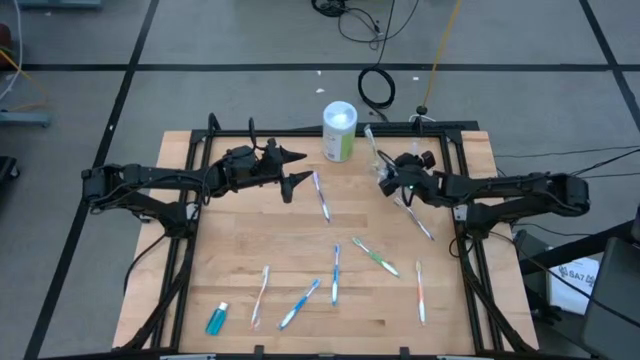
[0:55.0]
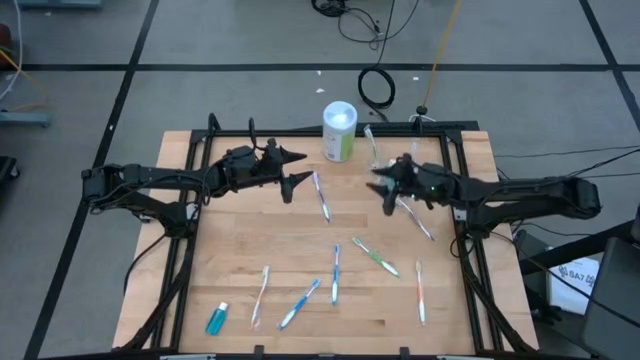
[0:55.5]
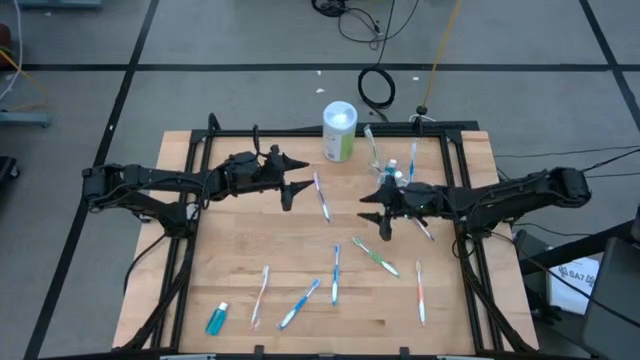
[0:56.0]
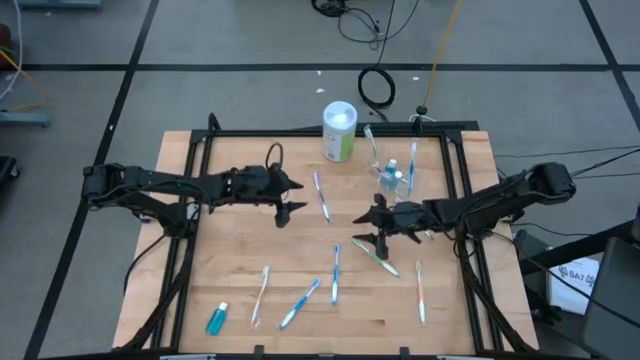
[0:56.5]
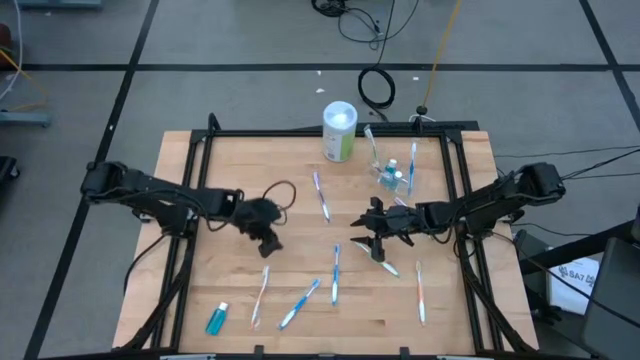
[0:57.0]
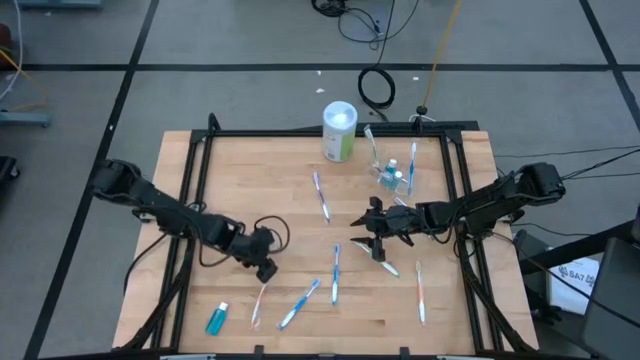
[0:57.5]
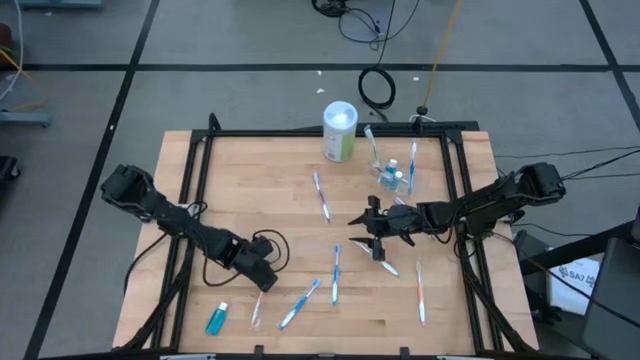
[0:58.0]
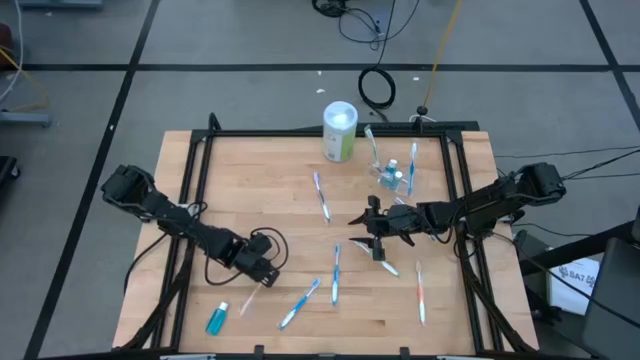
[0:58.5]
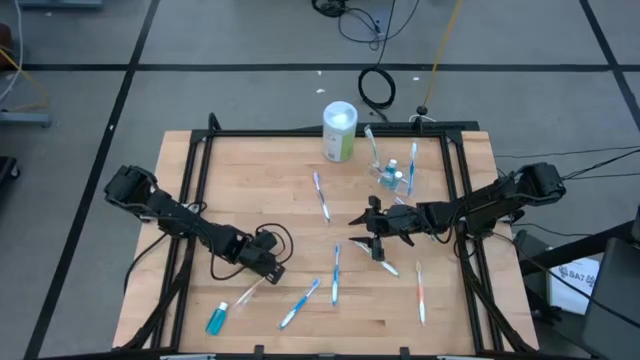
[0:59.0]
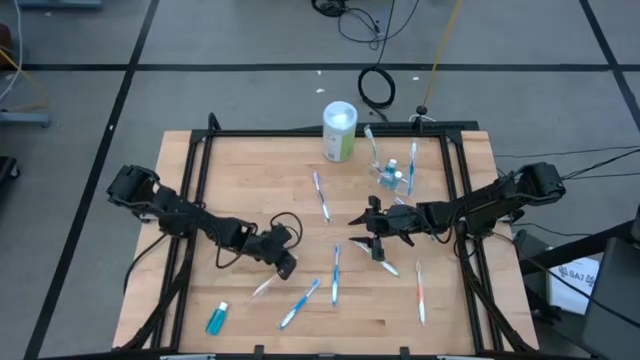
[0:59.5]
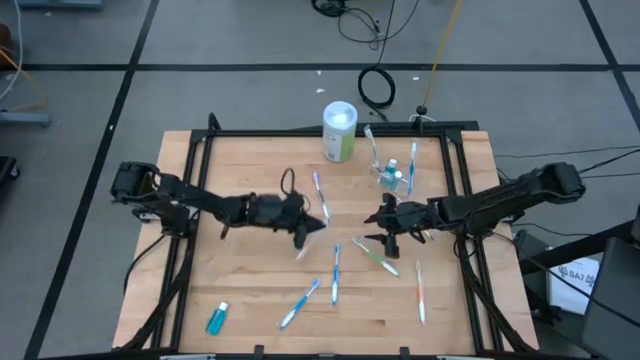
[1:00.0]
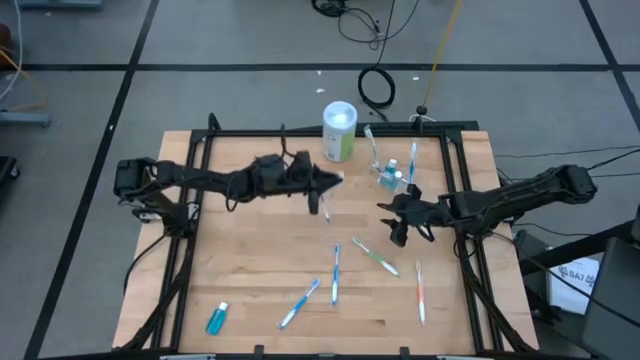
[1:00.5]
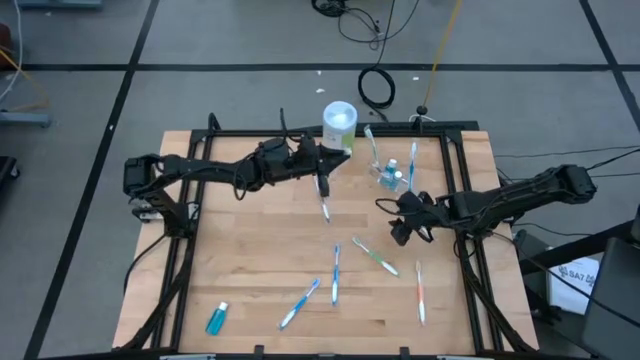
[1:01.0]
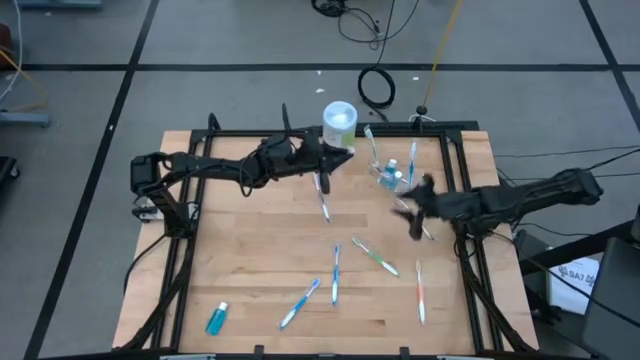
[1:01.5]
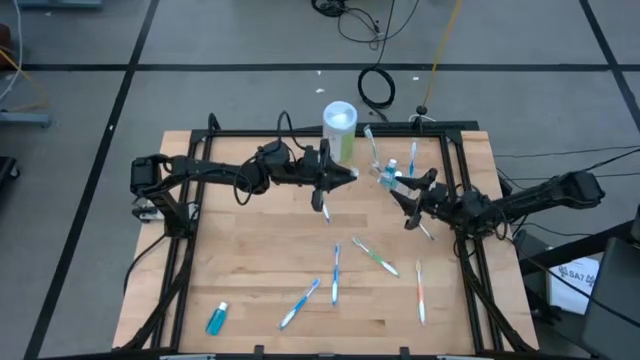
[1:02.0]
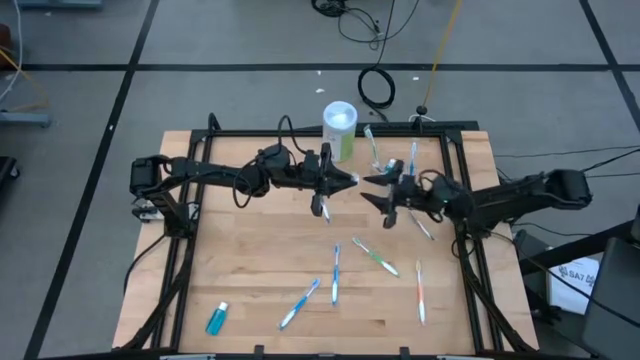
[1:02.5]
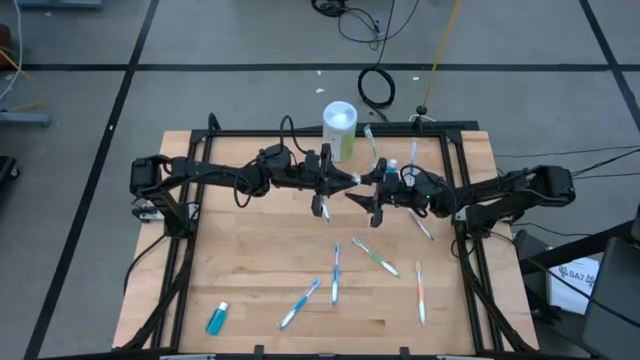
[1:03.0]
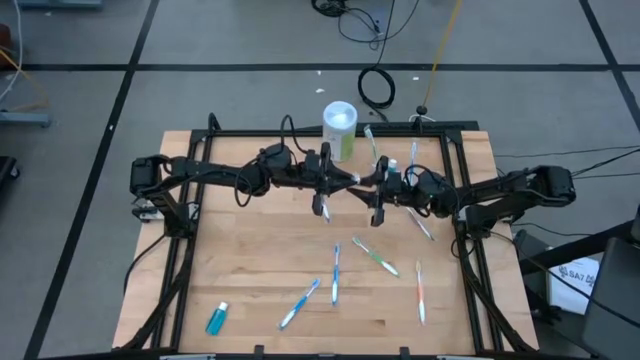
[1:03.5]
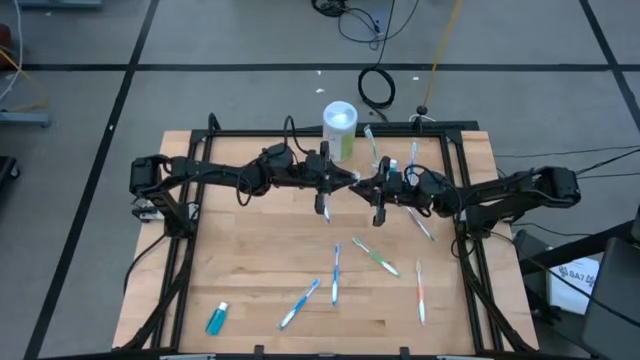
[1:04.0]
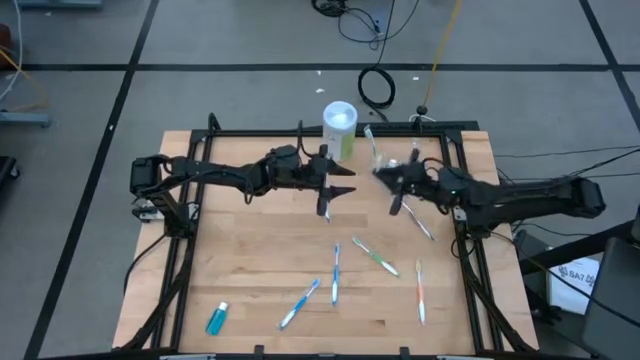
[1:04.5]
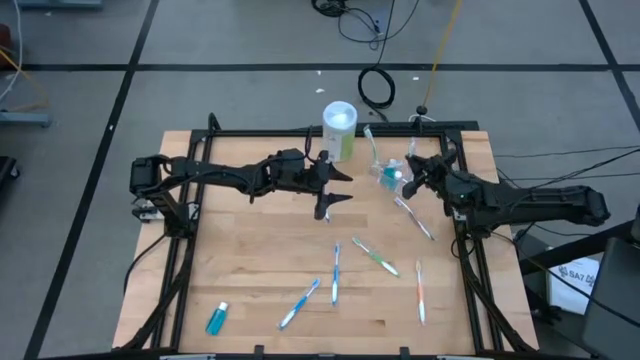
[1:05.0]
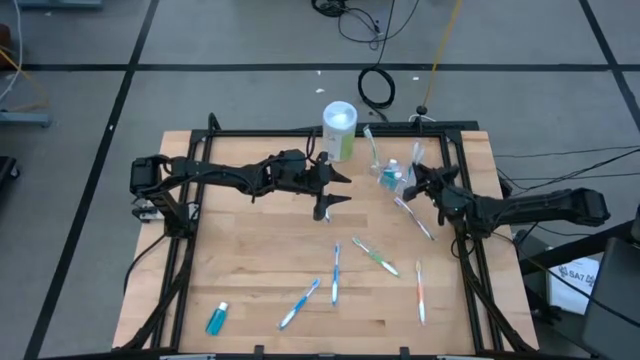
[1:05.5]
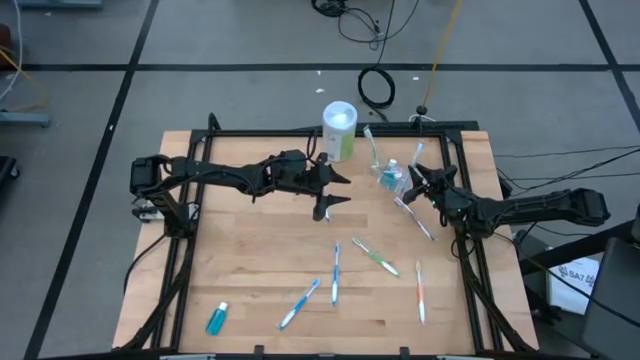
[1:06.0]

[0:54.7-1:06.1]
Task: Pick & Place toothbrushing station
Put the left orange toothbrush into the transparent organizer

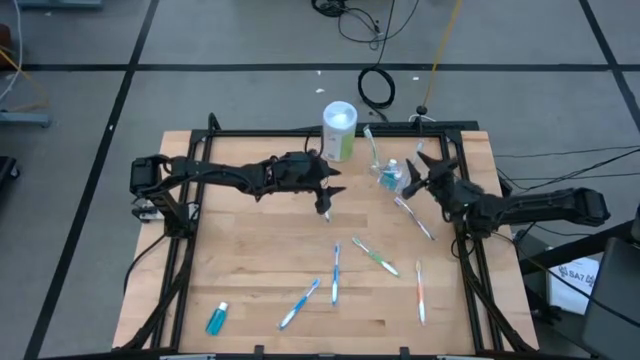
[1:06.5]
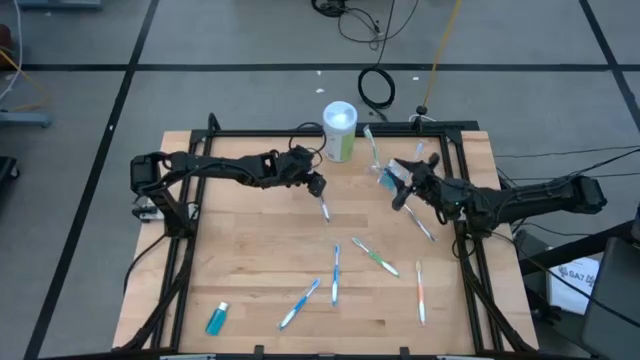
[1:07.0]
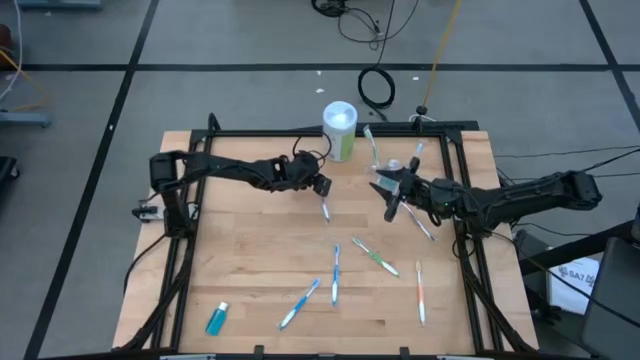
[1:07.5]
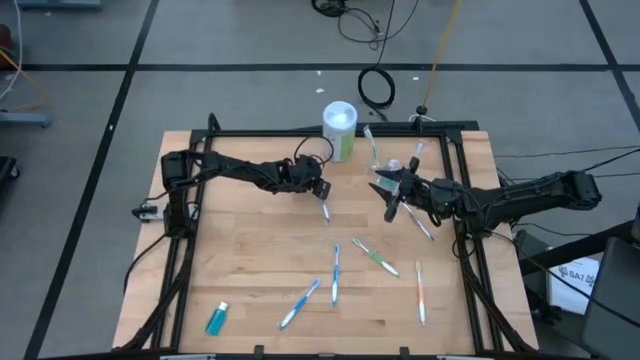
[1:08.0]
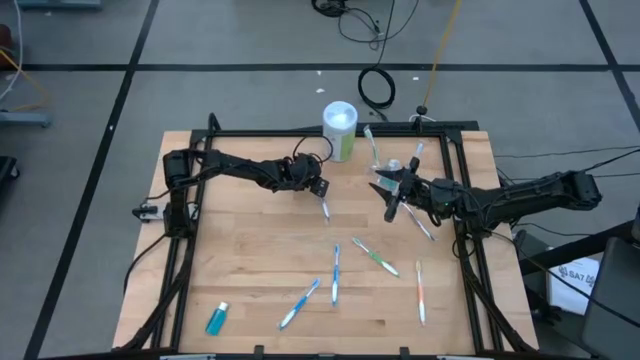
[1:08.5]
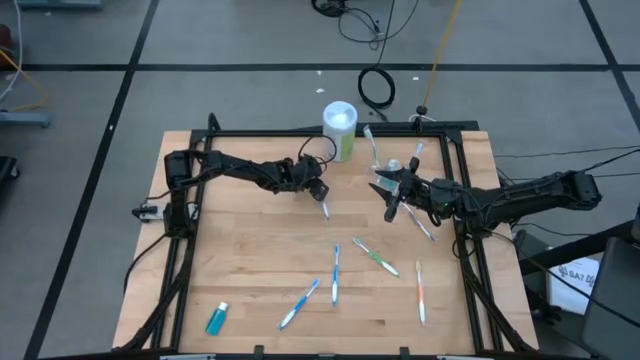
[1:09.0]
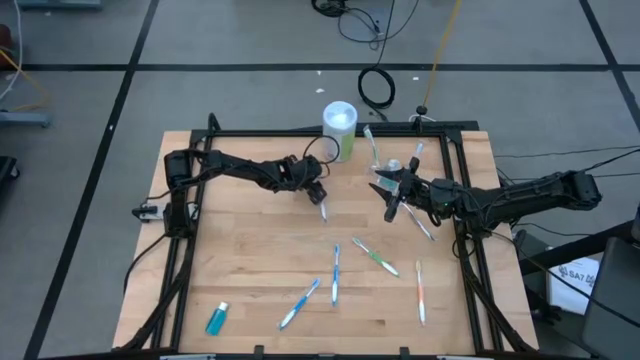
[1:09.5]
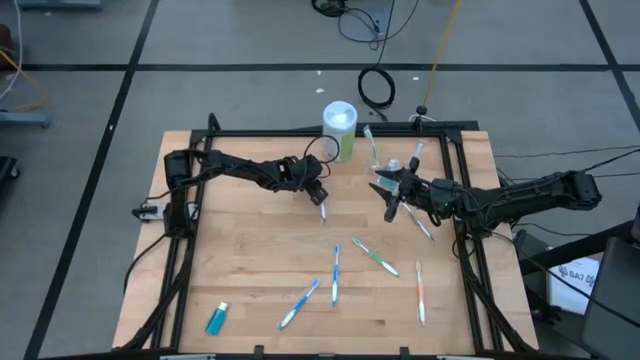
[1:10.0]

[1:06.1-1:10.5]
Put the left purple toothbrush into the transparent organizer

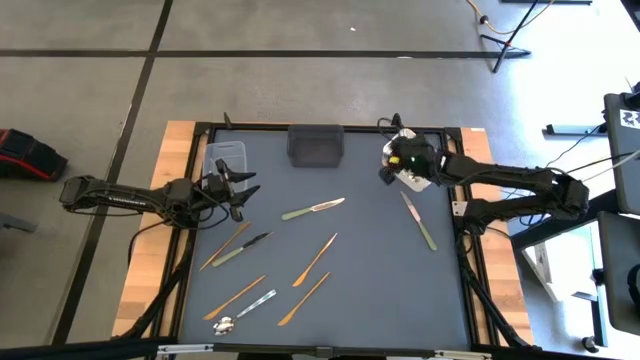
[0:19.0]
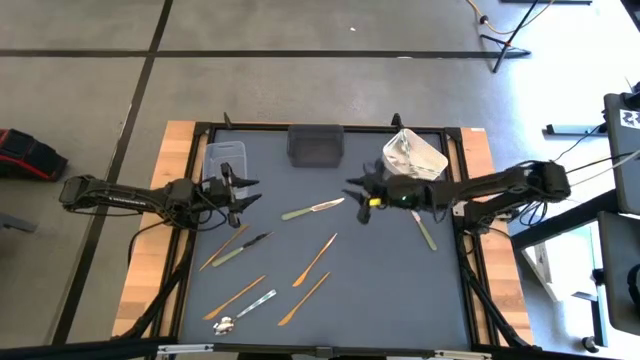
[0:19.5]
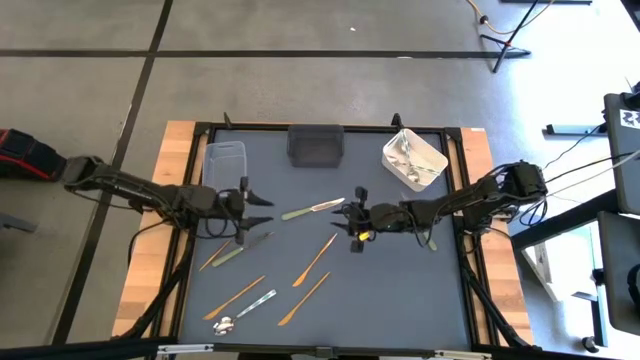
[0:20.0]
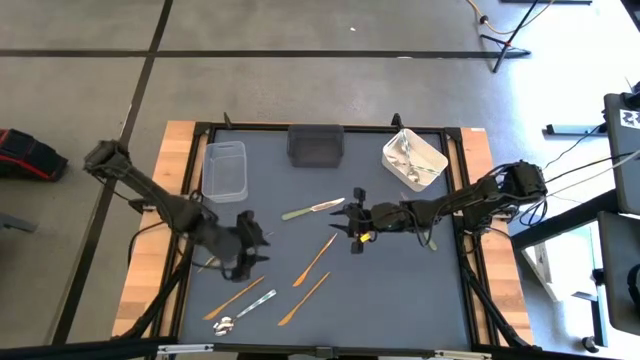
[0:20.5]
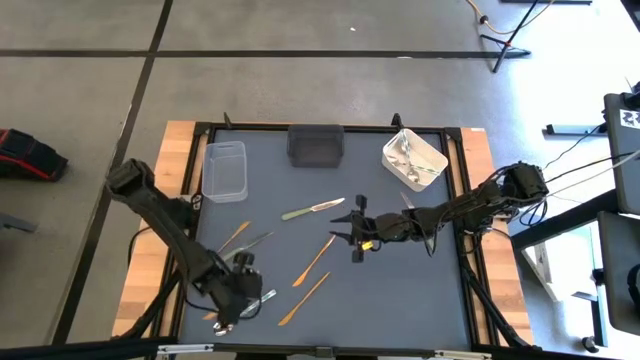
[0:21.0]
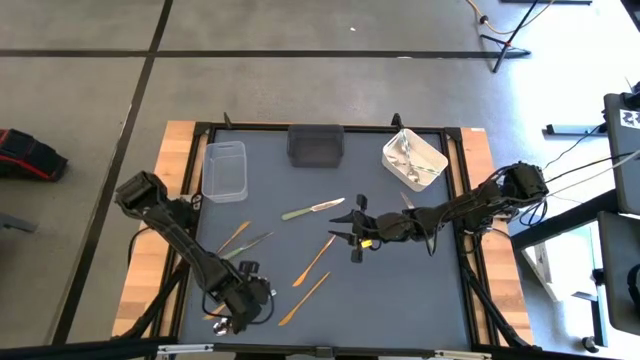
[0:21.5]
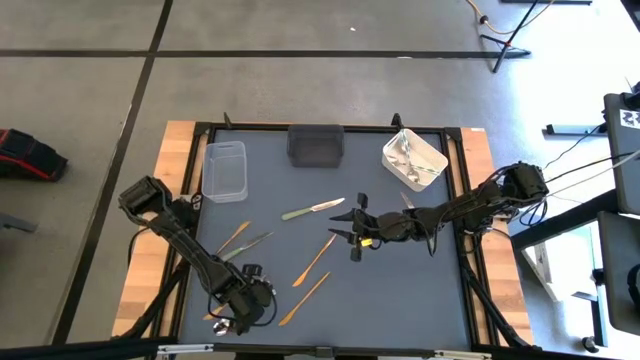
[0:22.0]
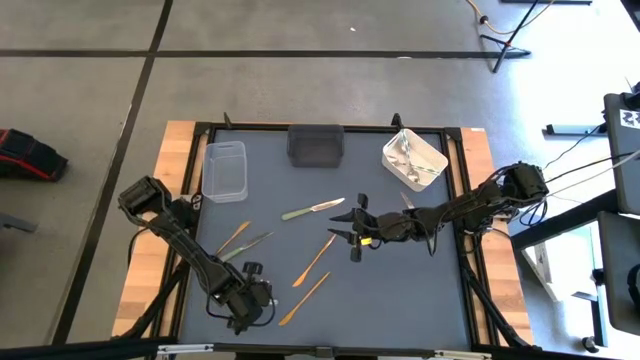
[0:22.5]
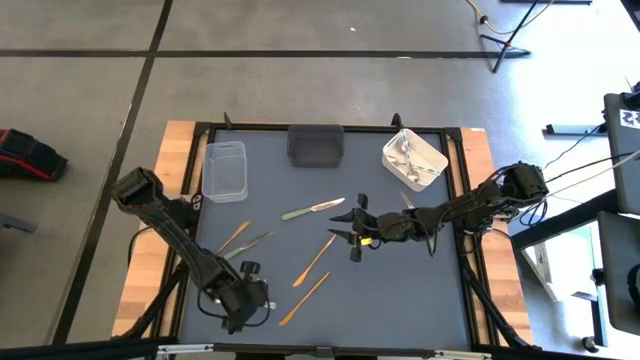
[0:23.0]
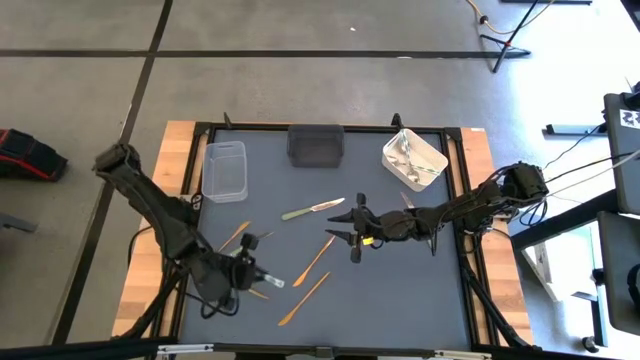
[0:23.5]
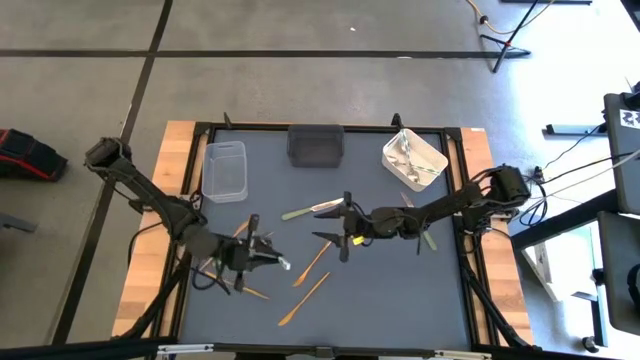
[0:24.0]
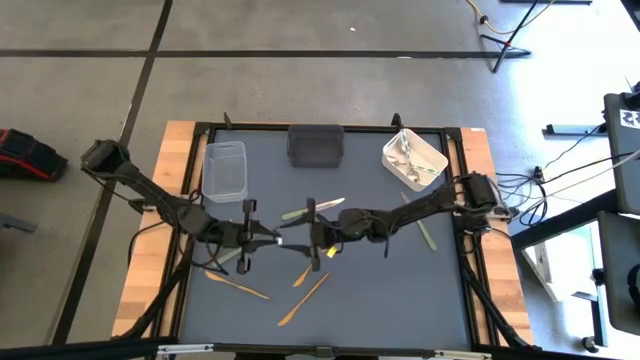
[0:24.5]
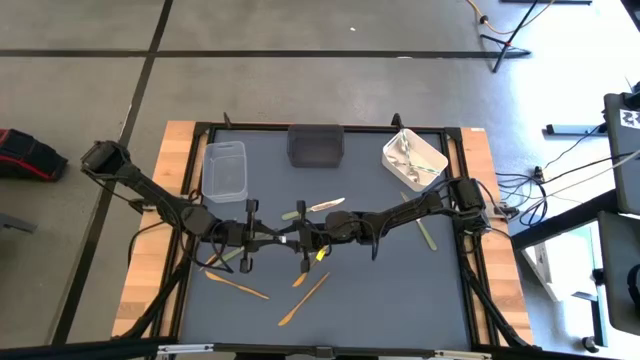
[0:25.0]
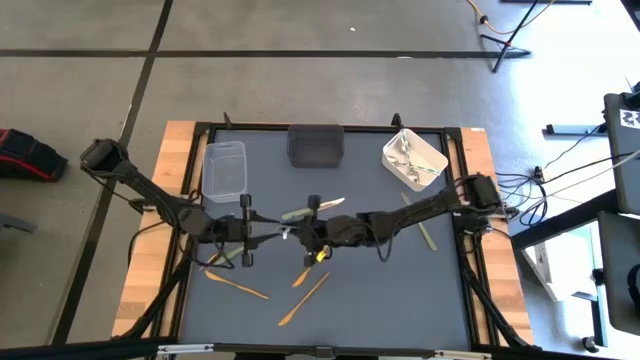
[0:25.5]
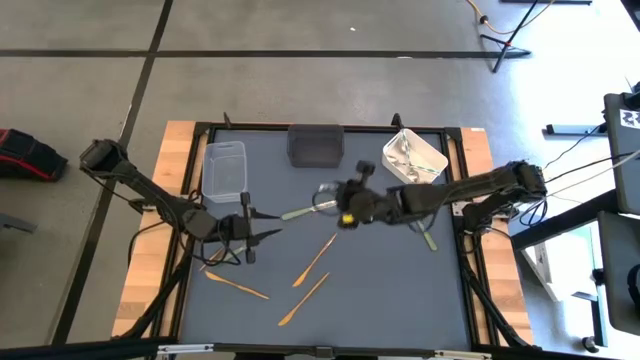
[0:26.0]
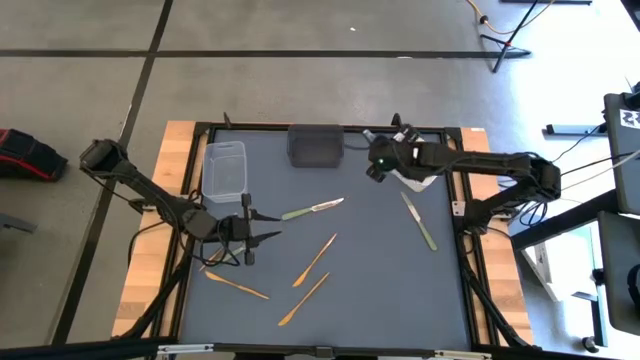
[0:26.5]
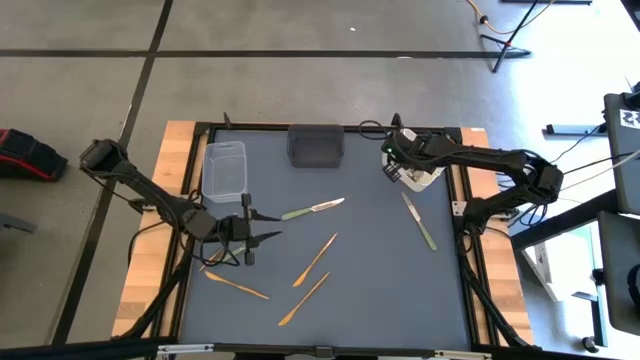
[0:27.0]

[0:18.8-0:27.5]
Task: Sort silverware by color (type)
Put the blue spoon into the white bin
